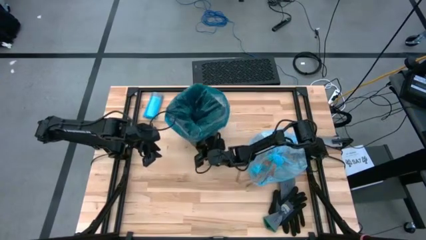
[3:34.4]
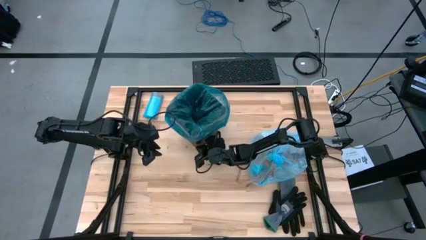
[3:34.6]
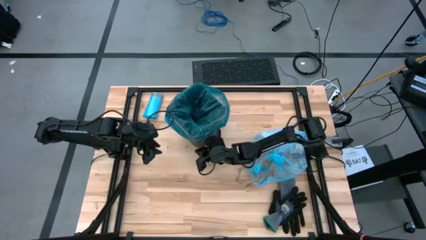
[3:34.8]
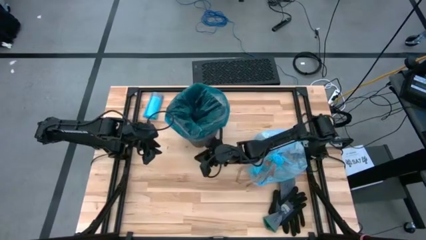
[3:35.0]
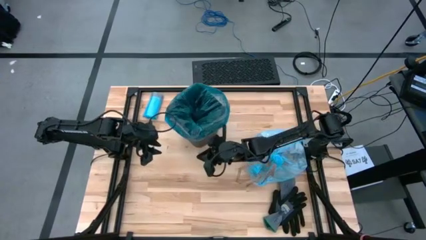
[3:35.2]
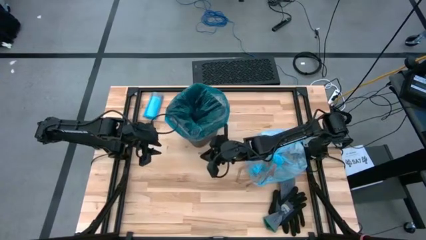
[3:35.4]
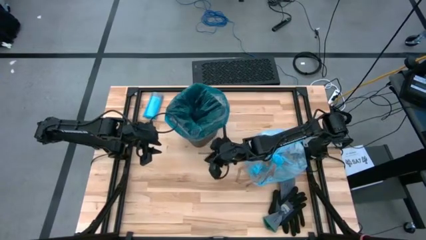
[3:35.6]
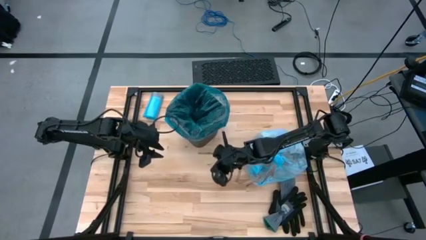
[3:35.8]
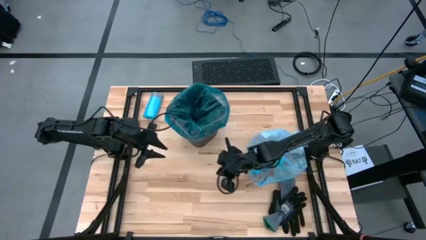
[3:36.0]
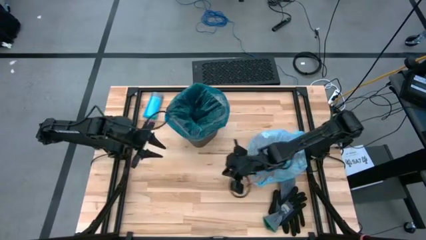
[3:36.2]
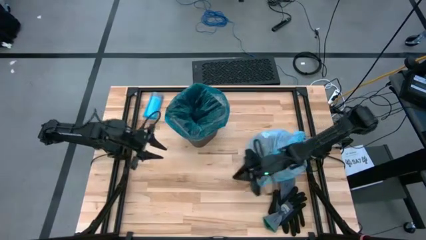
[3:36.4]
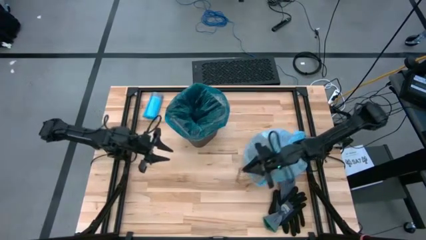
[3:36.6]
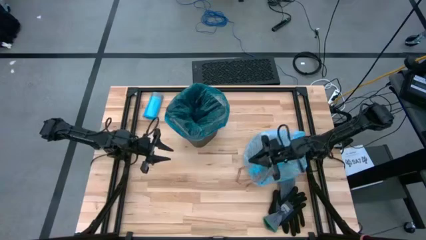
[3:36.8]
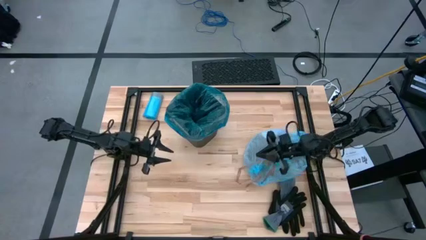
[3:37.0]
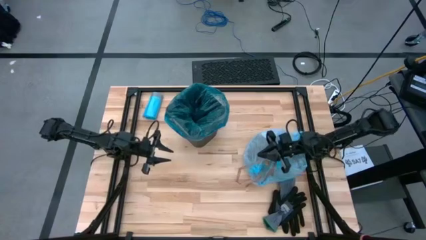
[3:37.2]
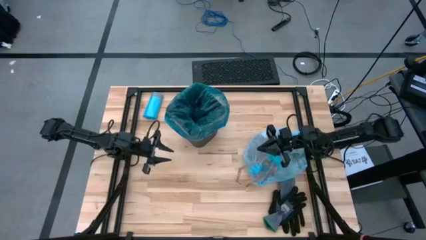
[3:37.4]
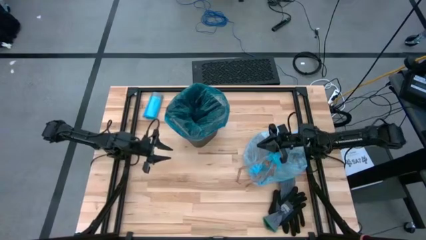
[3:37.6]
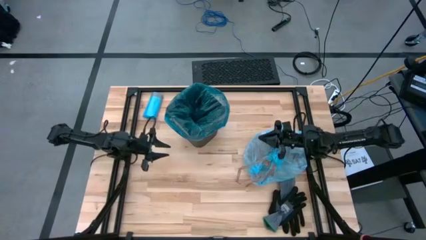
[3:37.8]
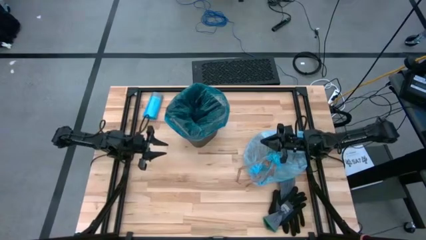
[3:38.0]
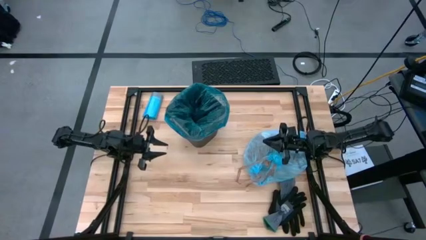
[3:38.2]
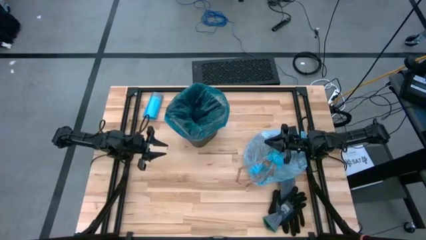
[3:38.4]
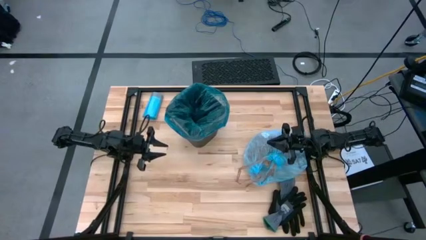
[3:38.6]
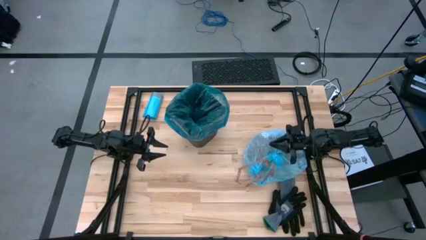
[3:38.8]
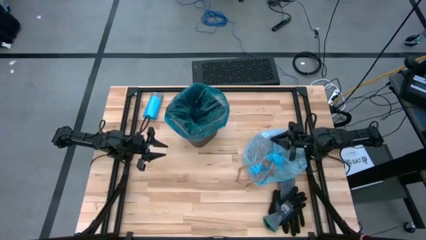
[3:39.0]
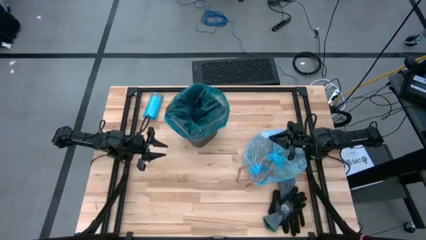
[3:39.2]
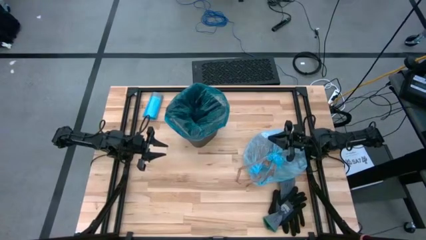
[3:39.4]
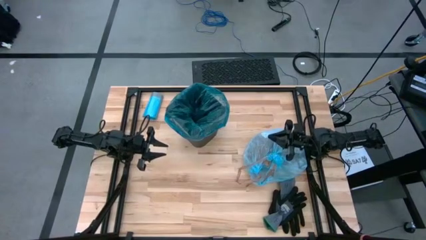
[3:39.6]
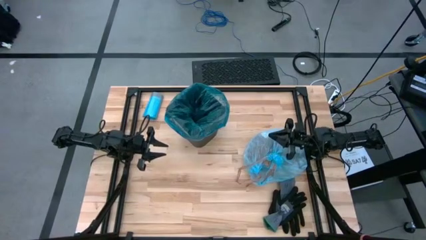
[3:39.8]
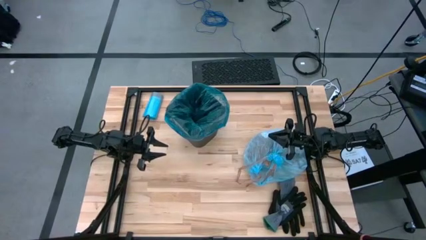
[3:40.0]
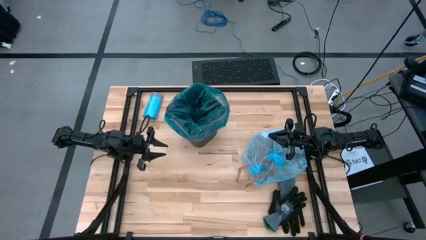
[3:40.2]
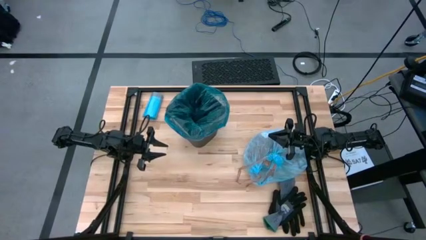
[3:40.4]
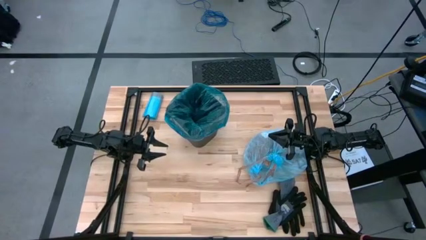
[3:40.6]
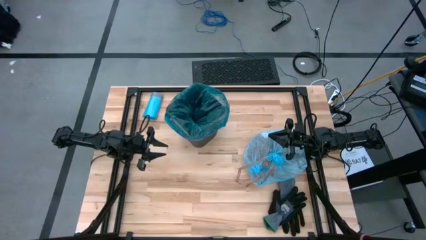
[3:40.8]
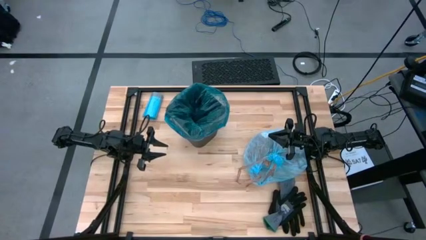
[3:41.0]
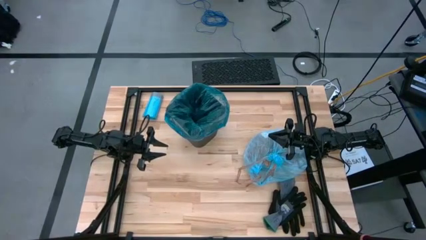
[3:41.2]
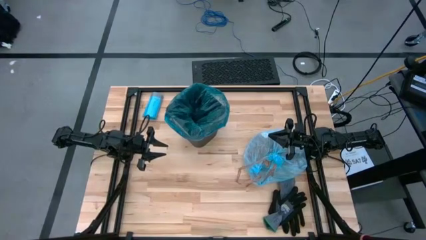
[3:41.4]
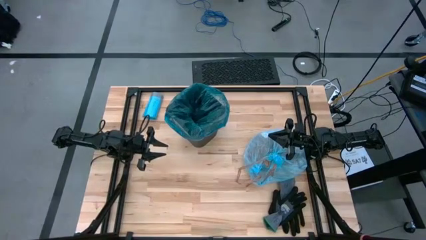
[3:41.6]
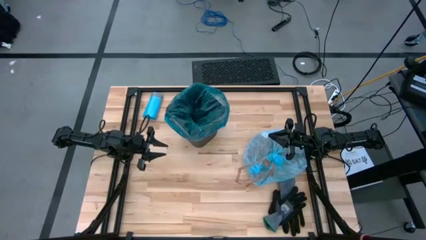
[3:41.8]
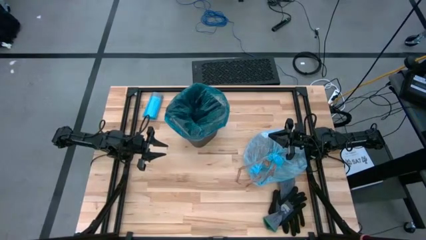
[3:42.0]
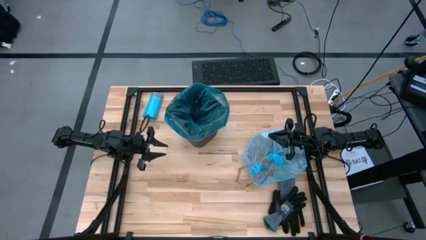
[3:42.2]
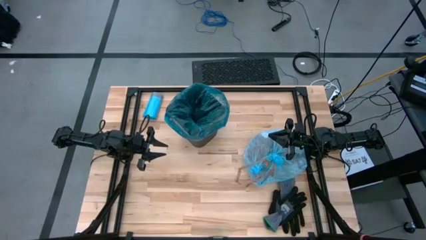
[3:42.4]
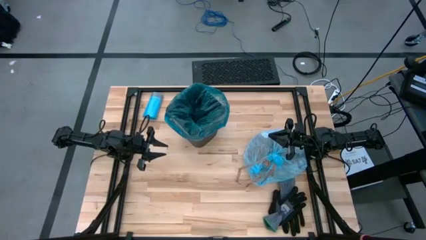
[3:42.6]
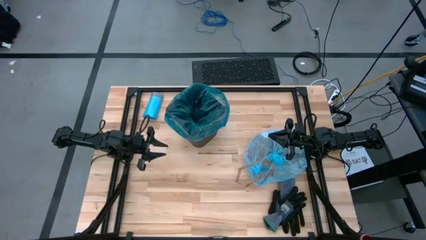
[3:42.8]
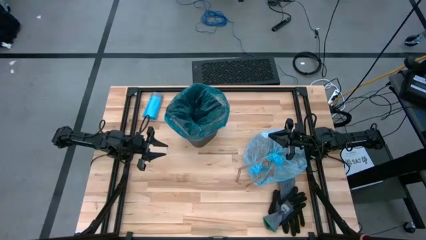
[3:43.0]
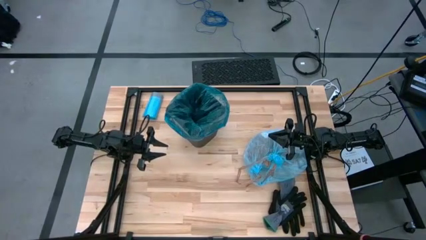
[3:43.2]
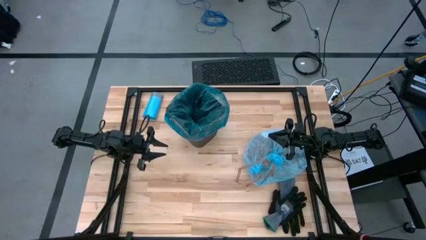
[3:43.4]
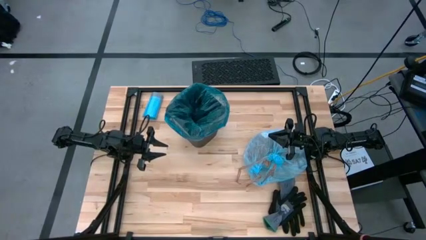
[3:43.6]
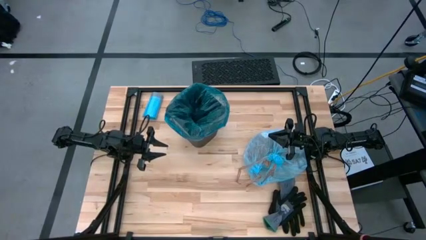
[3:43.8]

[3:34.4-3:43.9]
Task: place trash/remove bag and relplace
Return to Home Position

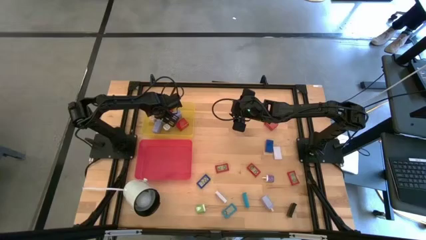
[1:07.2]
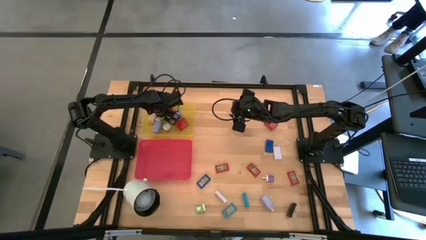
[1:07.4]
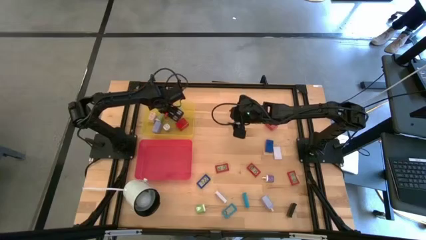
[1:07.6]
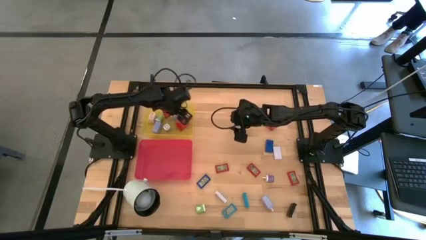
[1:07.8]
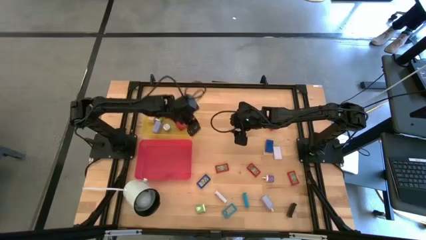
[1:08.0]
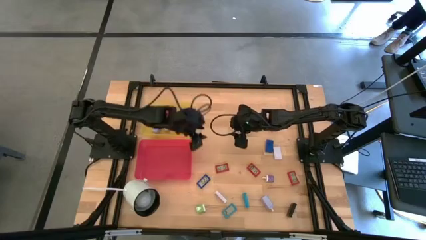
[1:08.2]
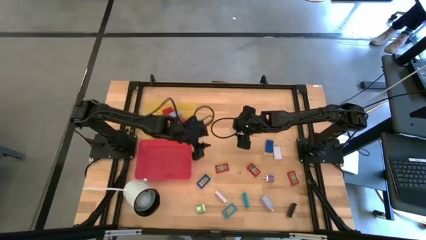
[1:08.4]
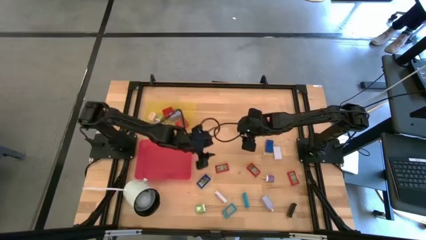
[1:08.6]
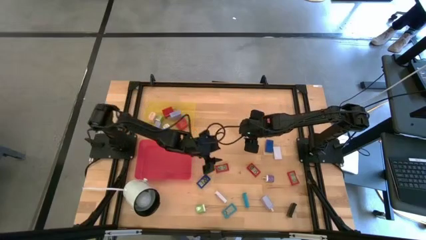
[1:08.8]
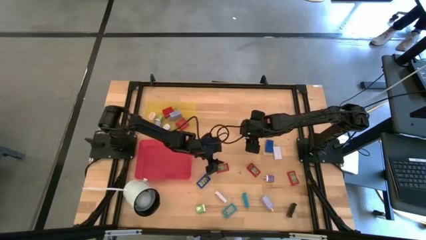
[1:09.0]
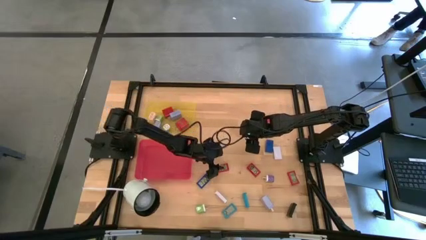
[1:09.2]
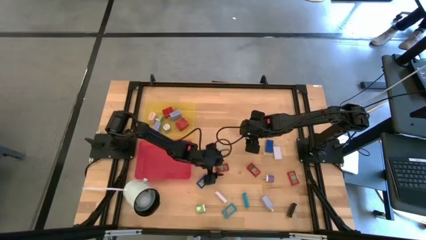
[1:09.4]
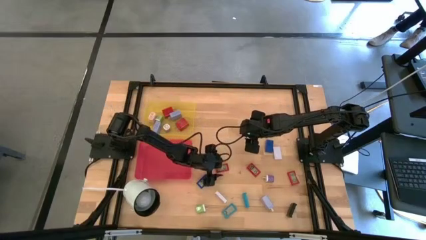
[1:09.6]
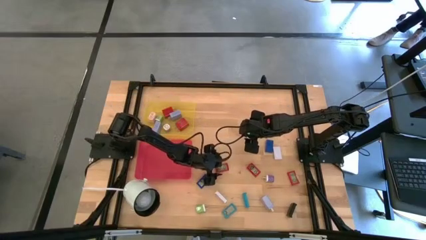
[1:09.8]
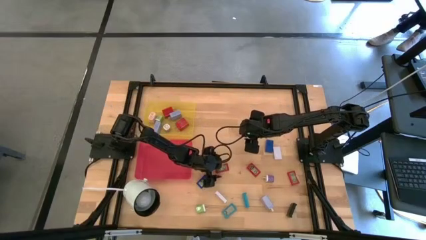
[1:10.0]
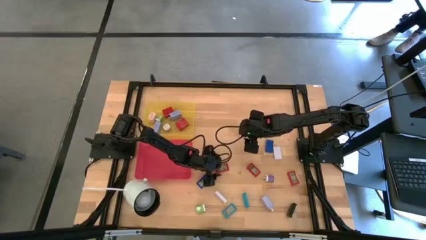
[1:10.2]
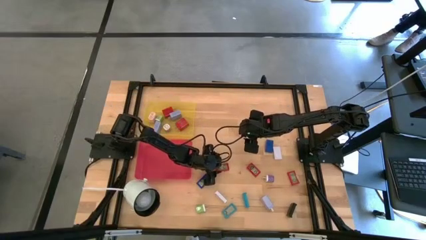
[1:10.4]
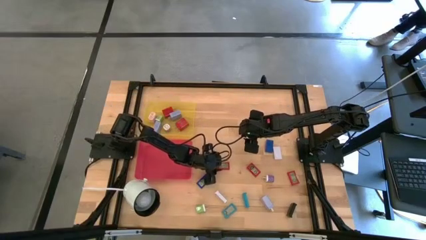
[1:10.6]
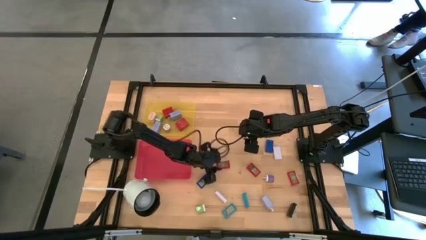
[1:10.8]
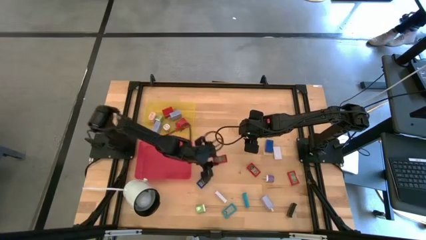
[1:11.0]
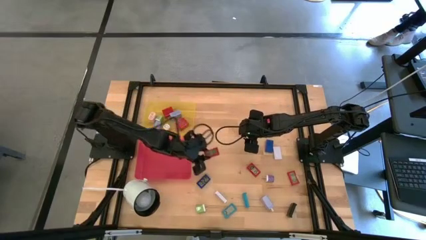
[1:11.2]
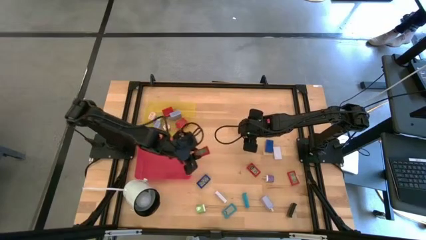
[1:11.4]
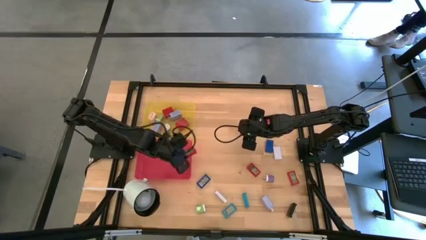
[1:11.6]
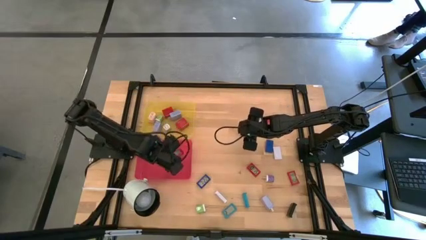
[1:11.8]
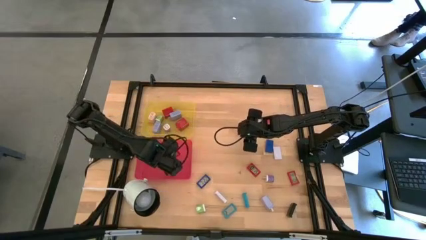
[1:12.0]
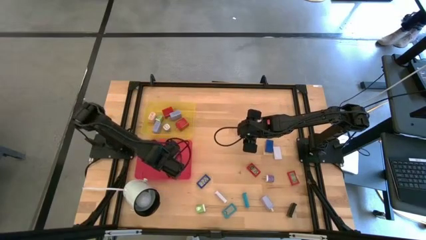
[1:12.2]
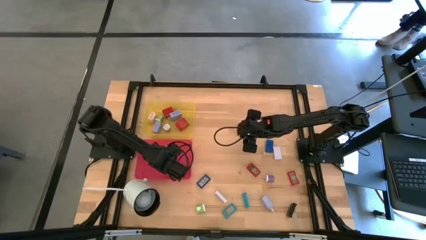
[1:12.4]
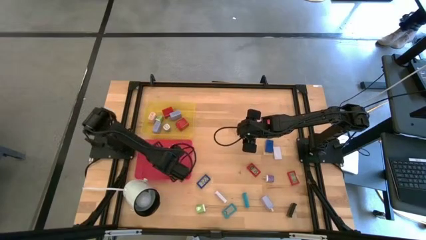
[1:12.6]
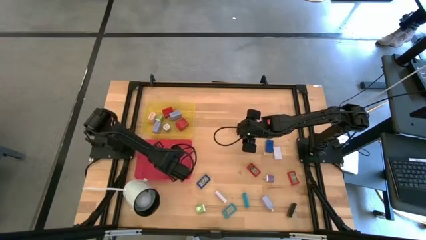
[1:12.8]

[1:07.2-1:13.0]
Task: Pick & Place Office items
Put the red timer into the red bin
